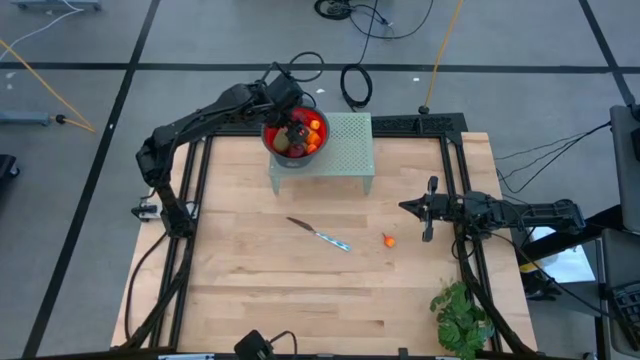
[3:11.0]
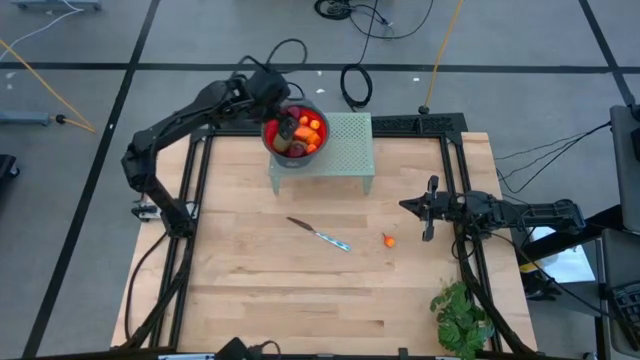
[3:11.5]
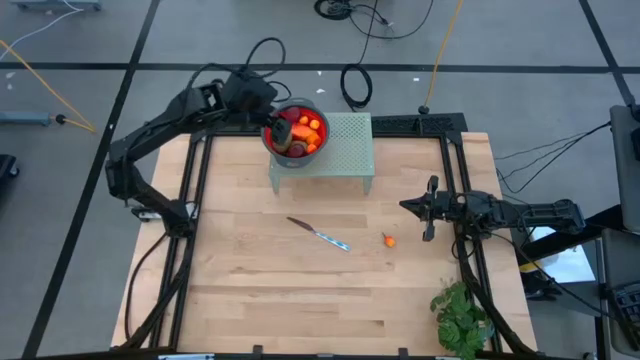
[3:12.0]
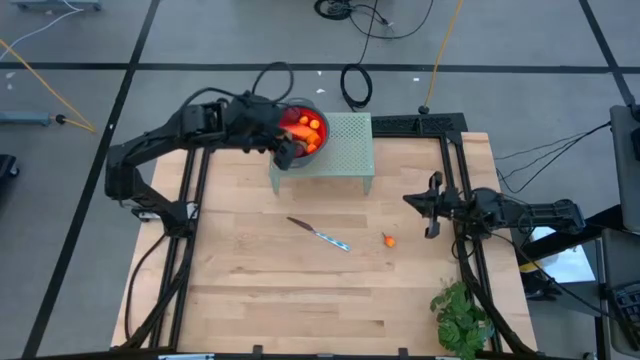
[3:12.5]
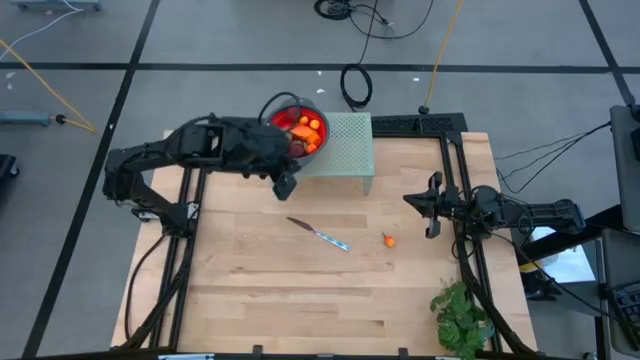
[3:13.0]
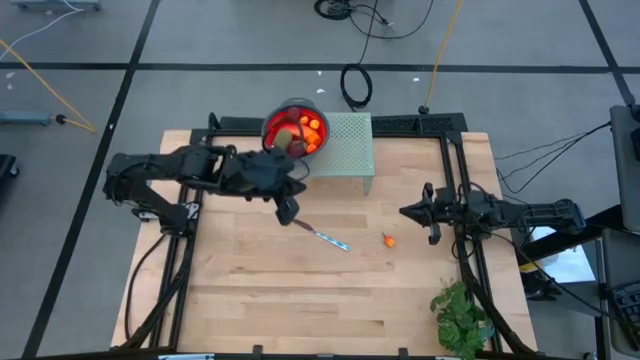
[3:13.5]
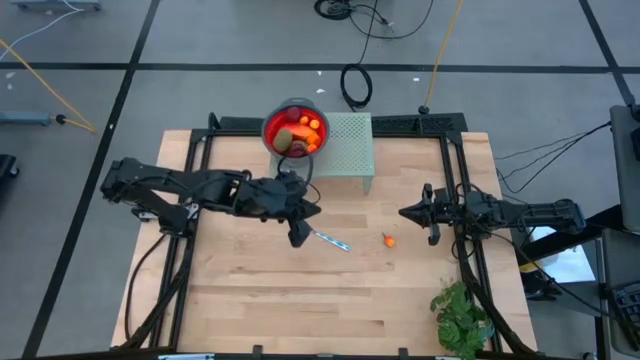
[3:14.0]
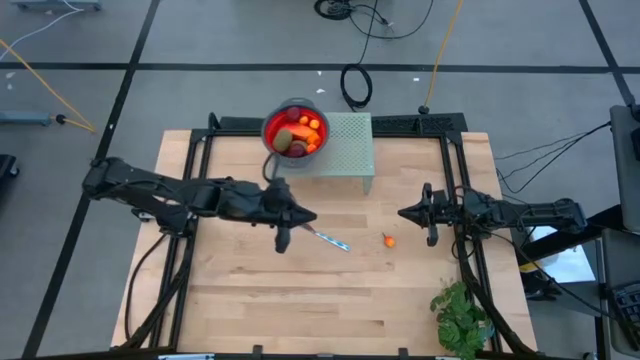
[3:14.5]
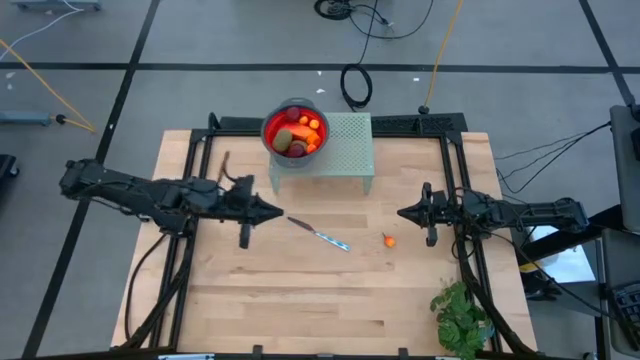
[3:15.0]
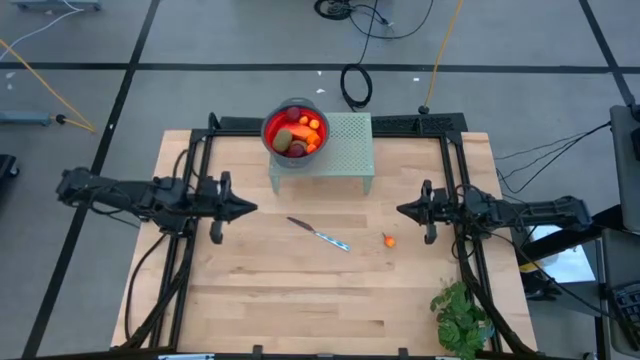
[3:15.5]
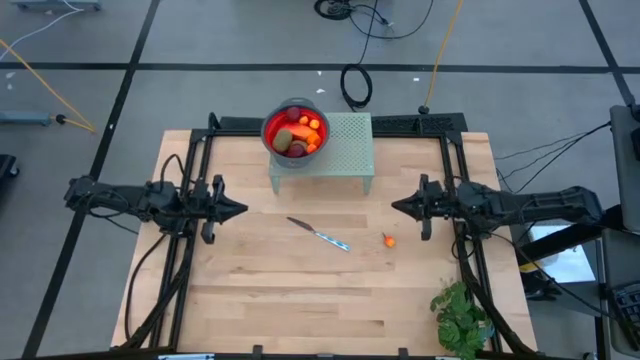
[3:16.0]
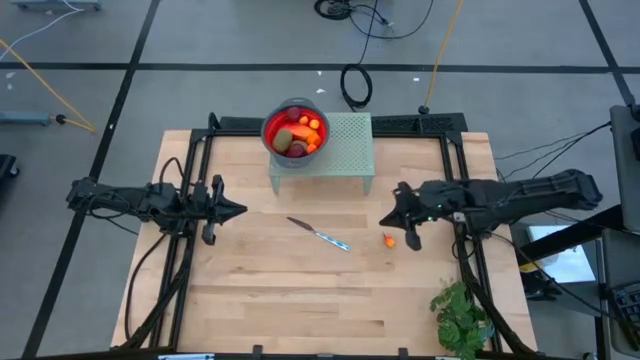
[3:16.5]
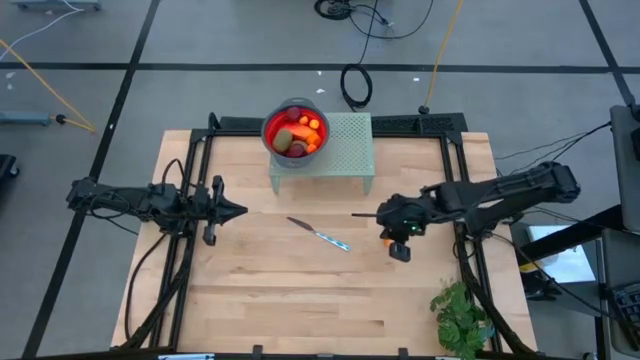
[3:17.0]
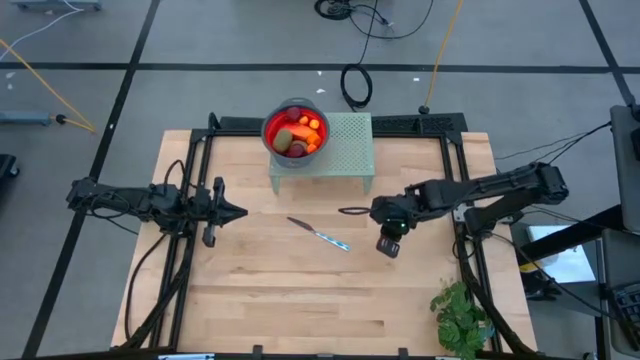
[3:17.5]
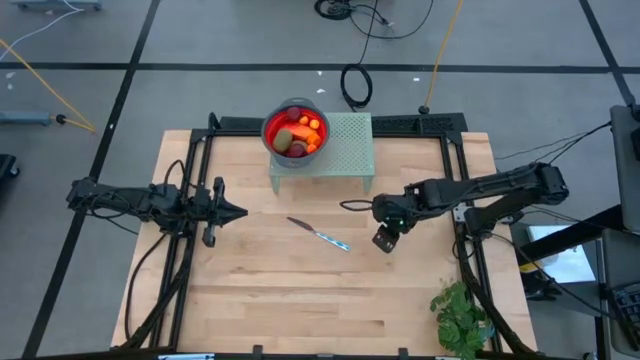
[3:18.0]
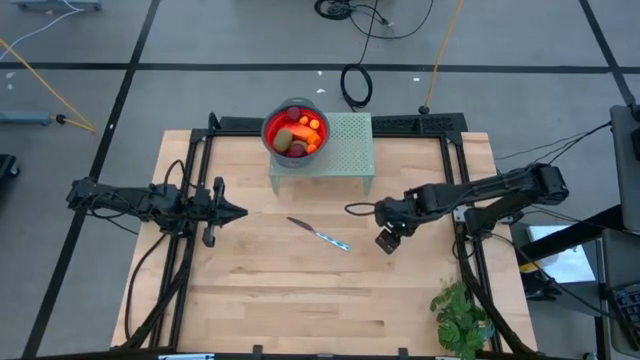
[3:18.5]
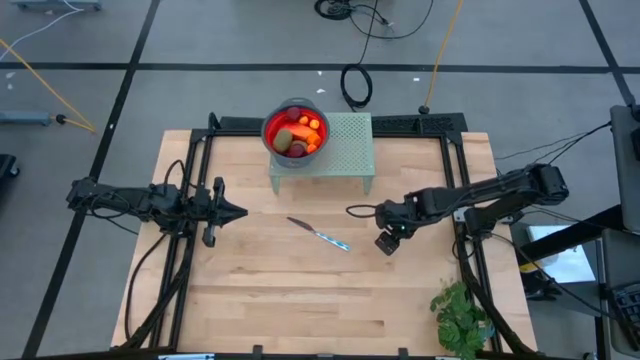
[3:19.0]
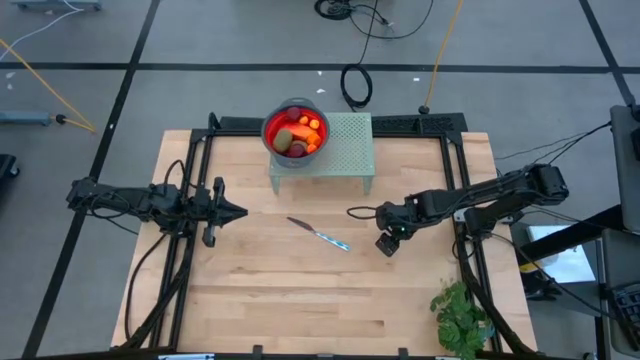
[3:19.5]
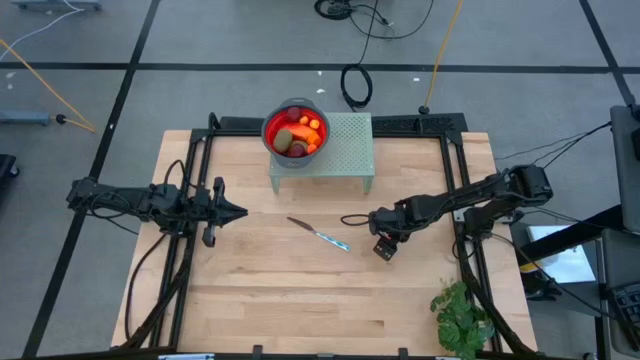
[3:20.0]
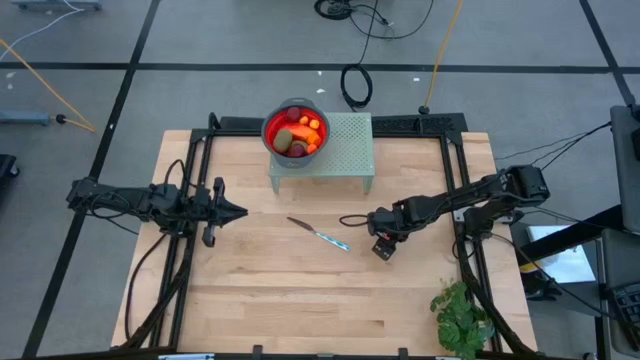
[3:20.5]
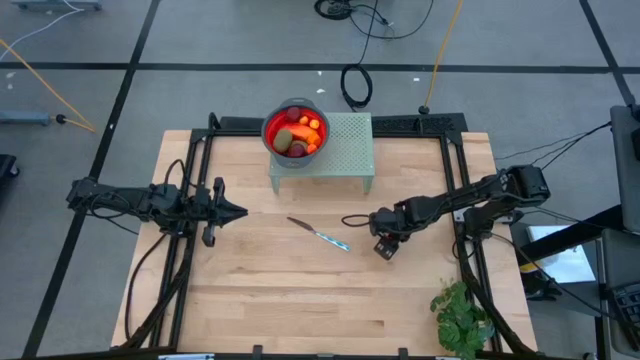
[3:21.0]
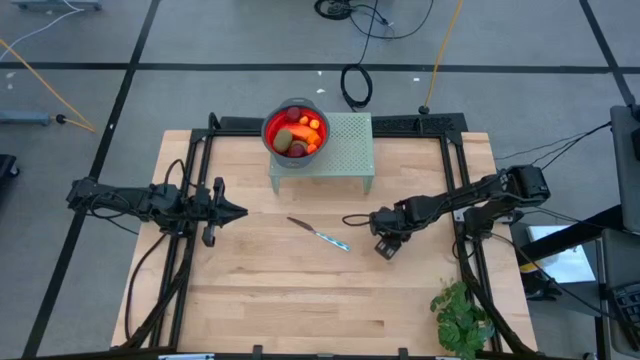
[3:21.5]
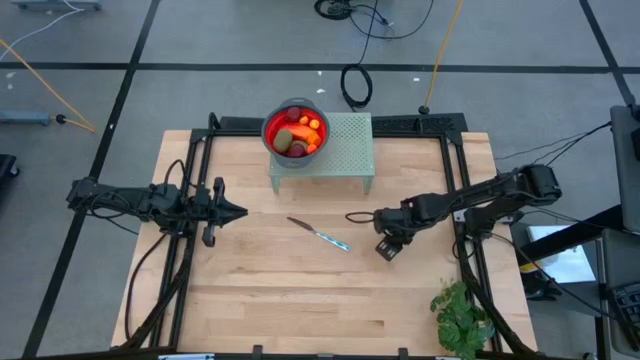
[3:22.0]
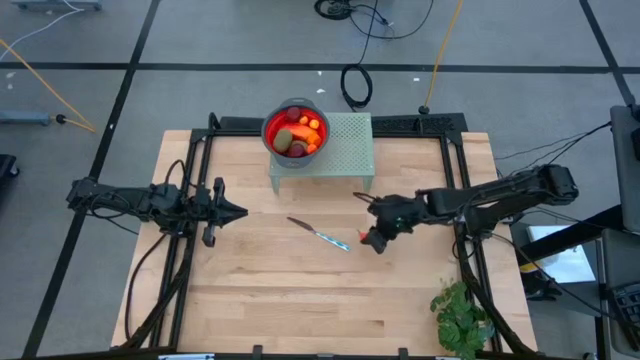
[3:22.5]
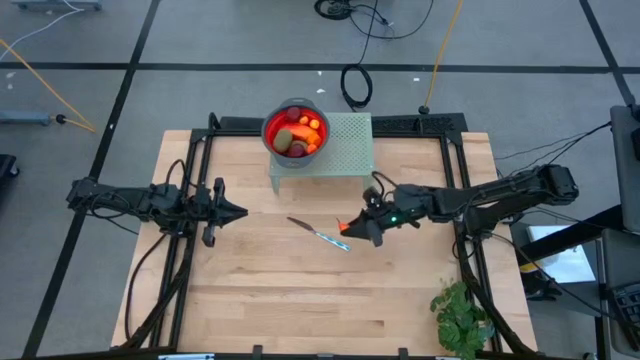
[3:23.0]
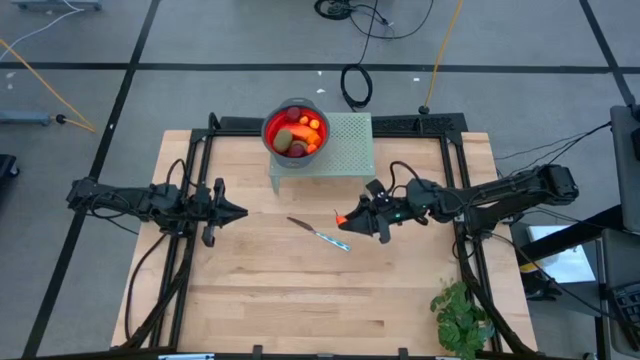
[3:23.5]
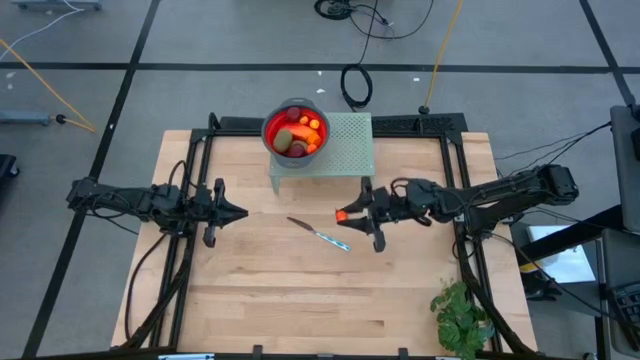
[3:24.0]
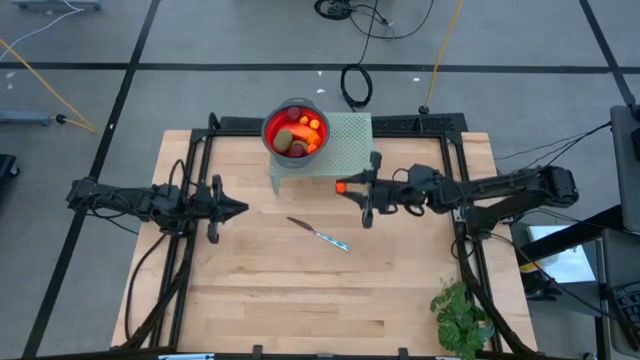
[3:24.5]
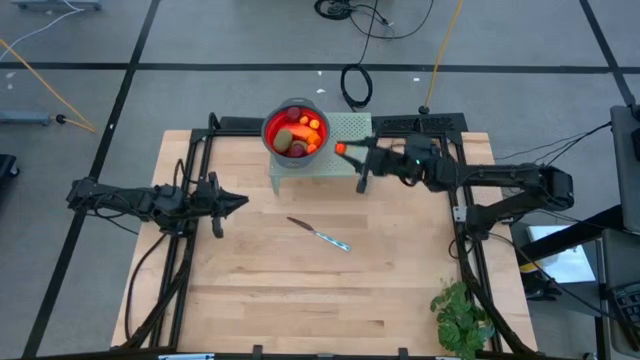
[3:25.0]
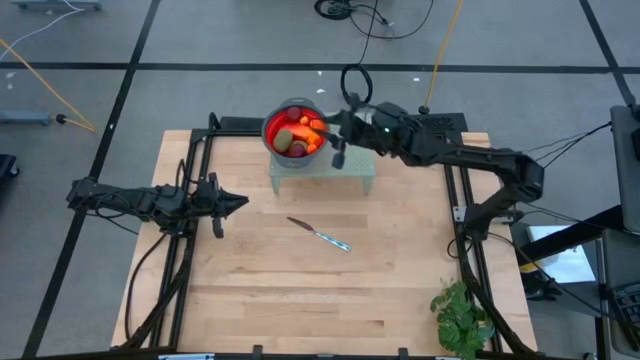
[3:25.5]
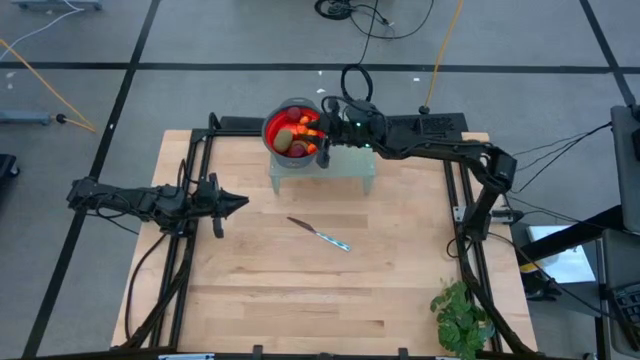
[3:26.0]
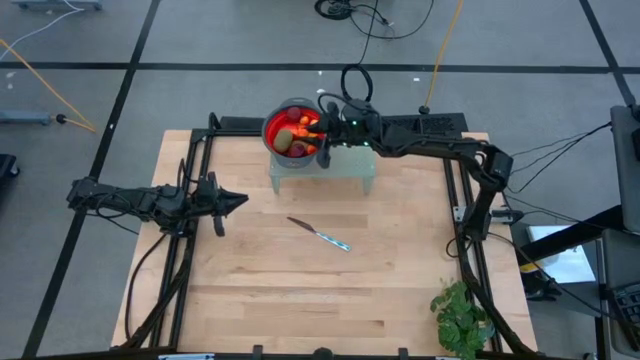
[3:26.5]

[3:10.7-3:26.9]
Task: Pick & Place Fruit
Put the peach into the red strainer bowl

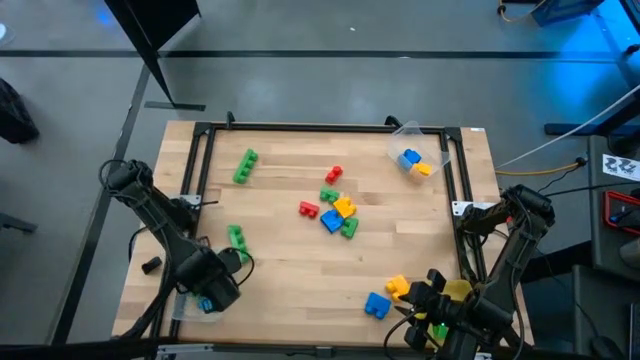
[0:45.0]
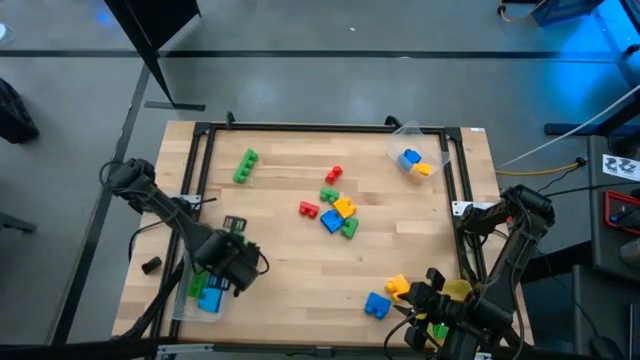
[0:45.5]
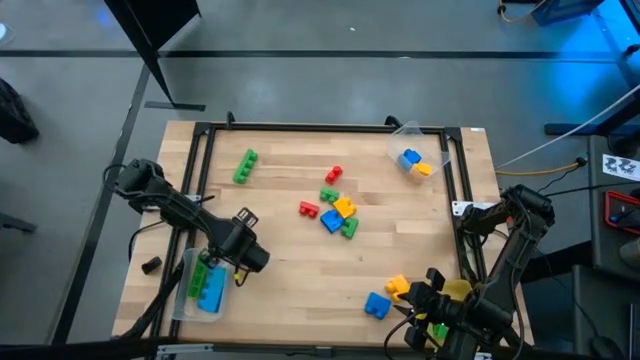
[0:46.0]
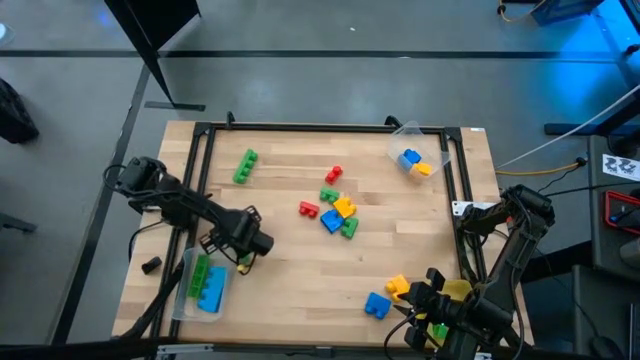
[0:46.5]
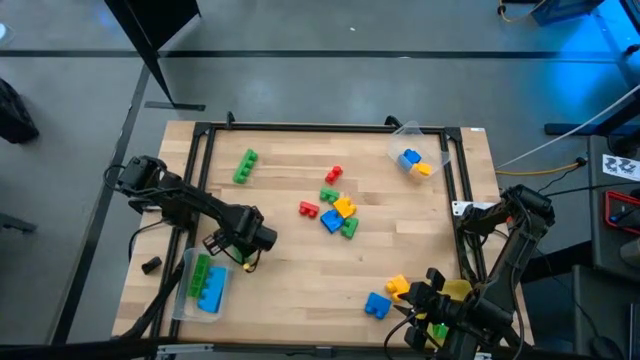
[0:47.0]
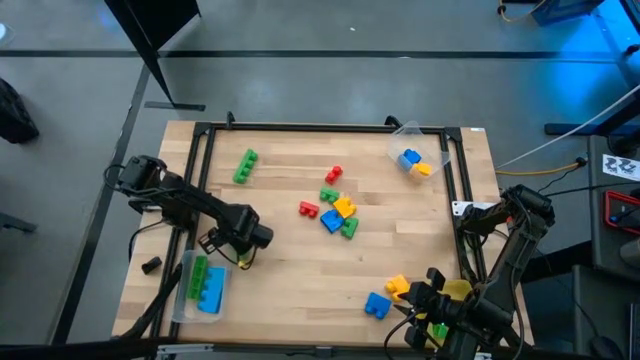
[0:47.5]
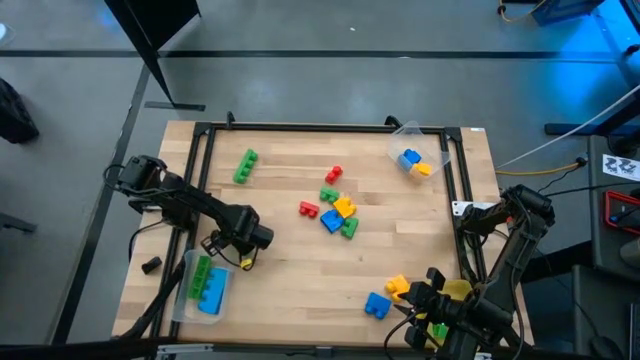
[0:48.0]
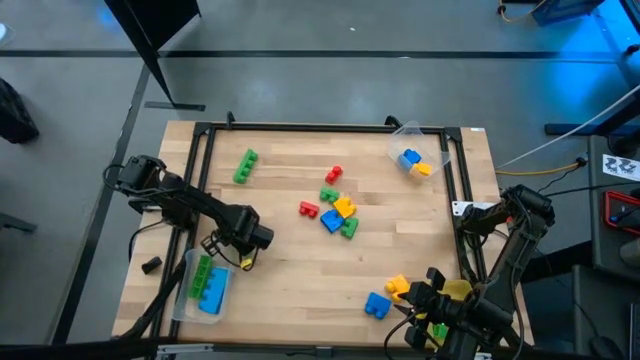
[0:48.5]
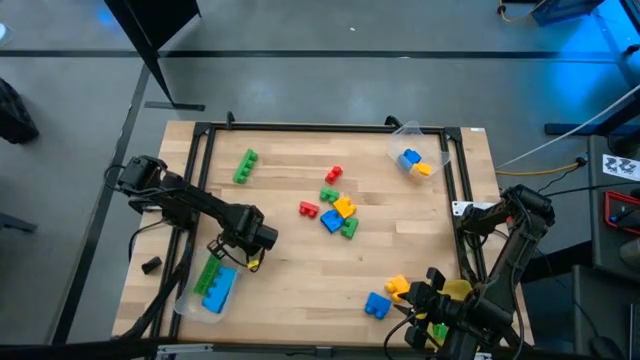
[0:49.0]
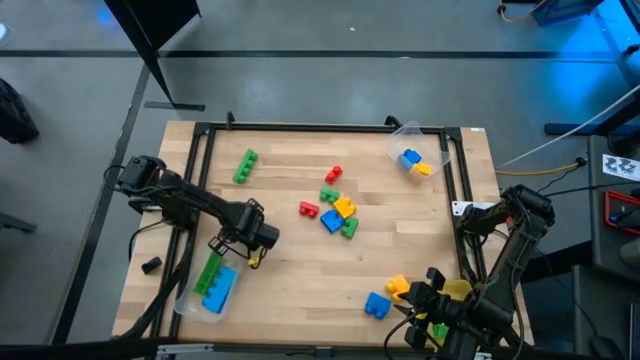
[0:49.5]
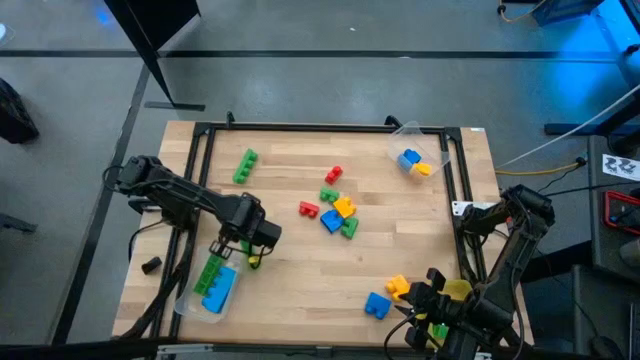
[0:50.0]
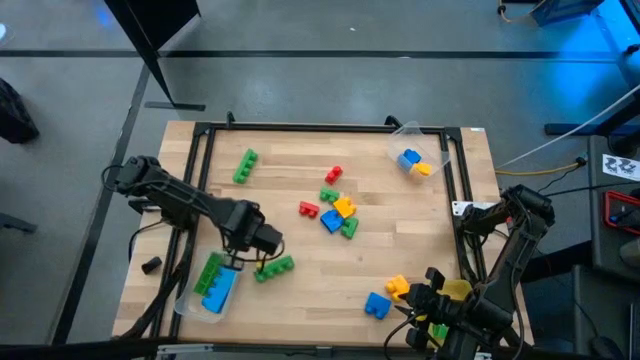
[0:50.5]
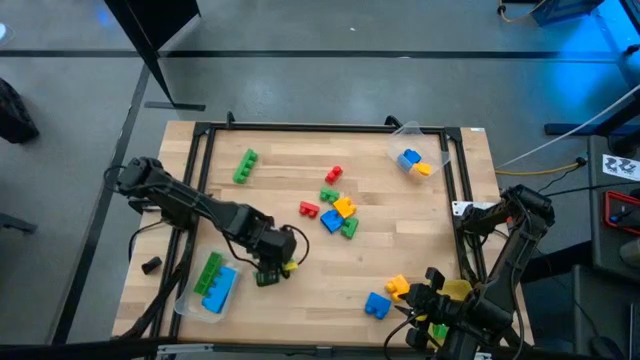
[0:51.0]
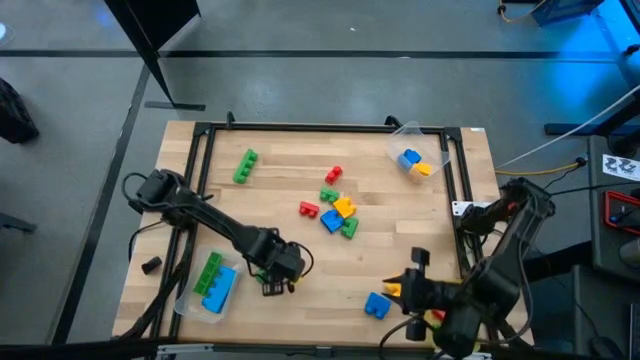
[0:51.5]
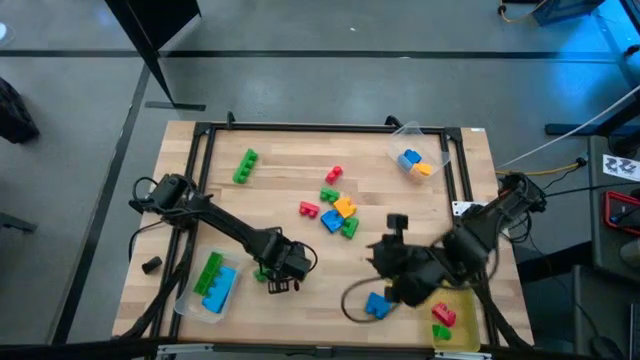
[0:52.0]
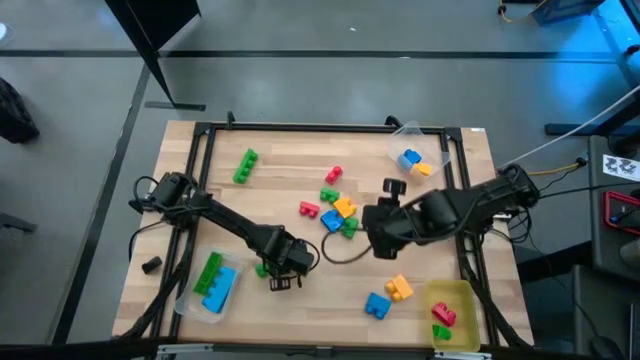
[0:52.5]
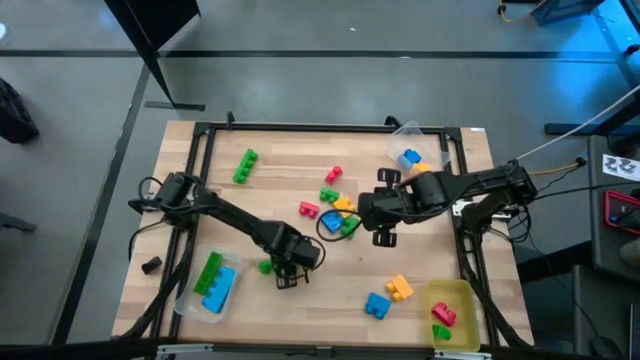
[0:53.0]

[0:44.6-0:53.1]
Task: Sort blocks by size
Put the bottom 4 stud green game piece into the bottom transparent bin
